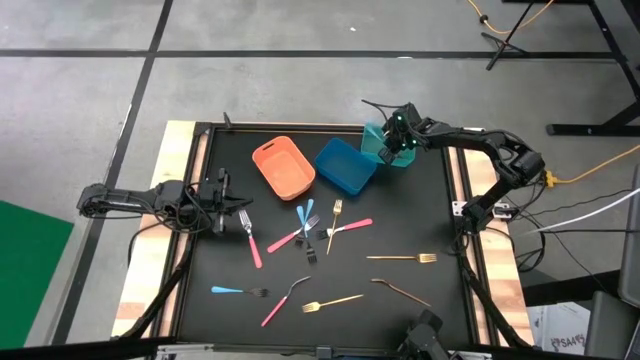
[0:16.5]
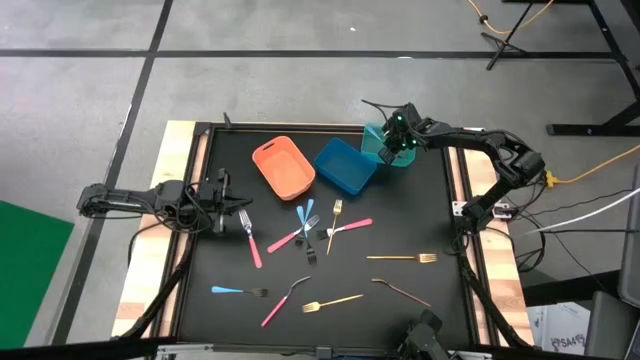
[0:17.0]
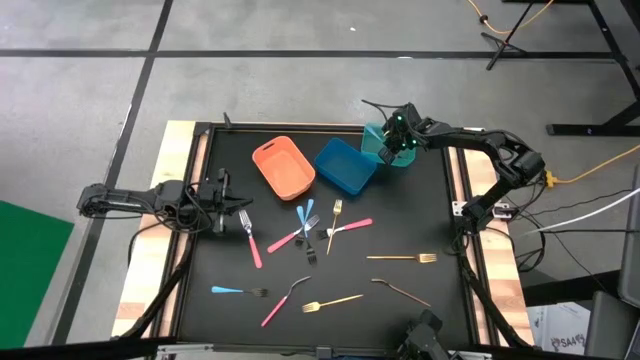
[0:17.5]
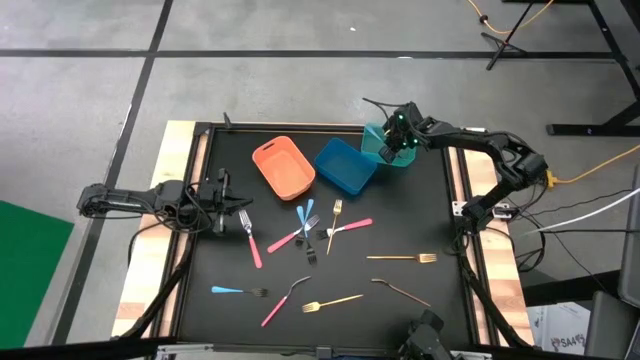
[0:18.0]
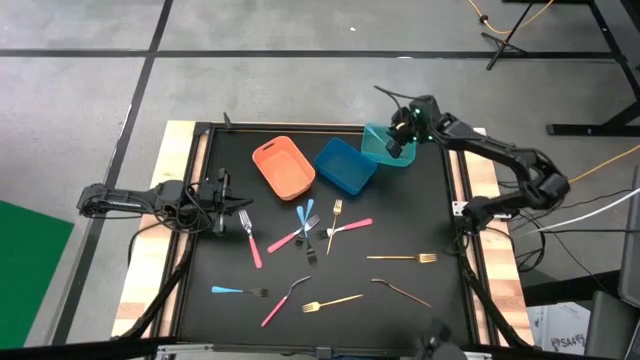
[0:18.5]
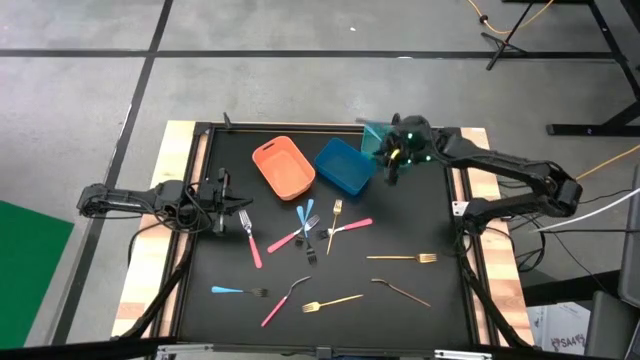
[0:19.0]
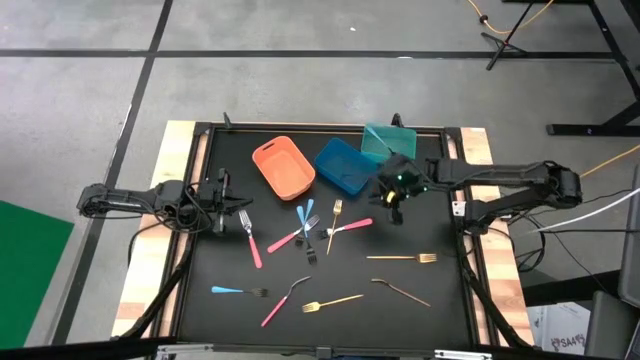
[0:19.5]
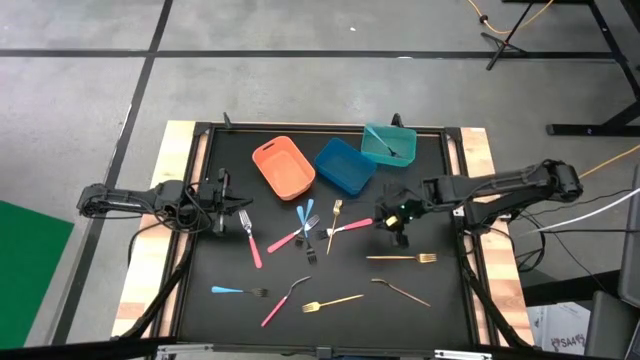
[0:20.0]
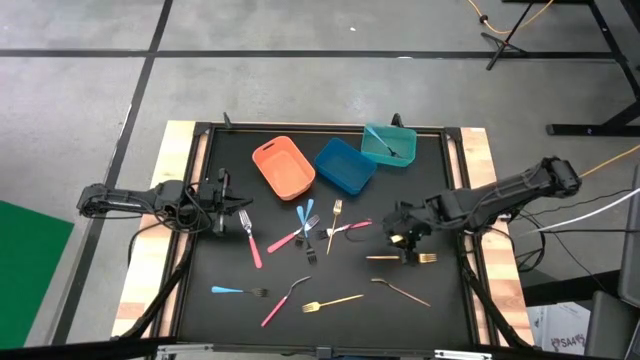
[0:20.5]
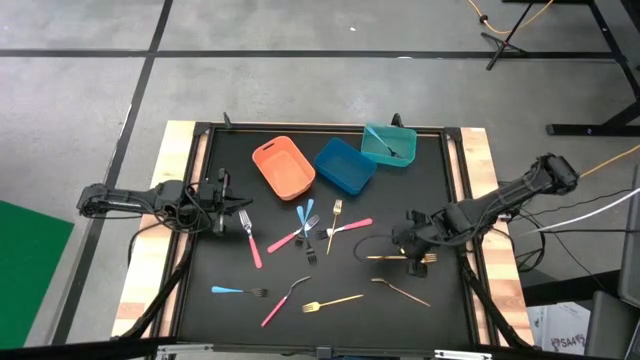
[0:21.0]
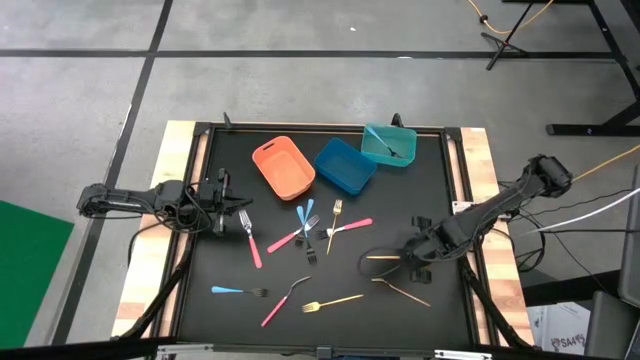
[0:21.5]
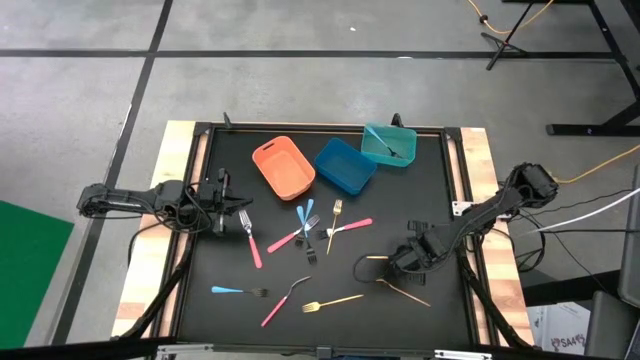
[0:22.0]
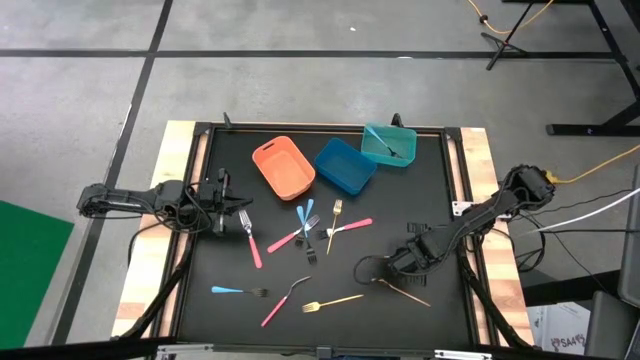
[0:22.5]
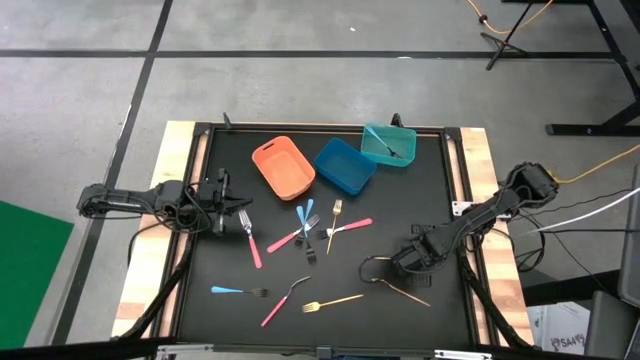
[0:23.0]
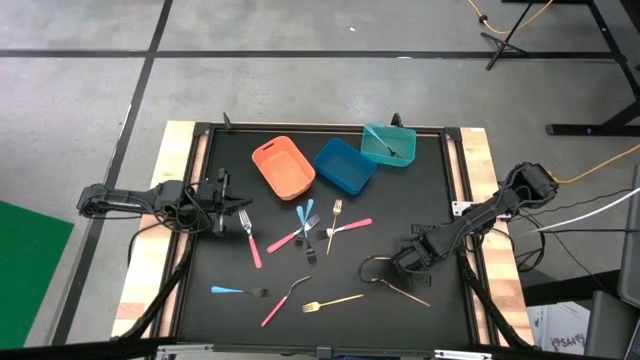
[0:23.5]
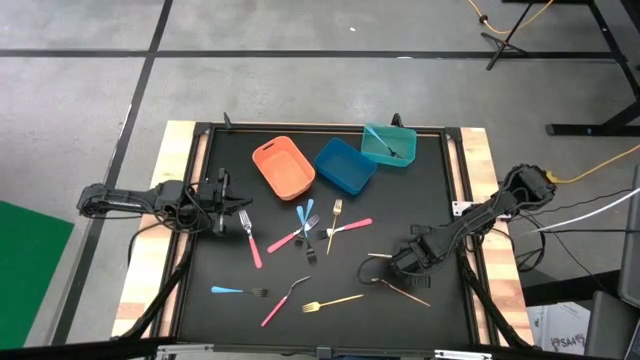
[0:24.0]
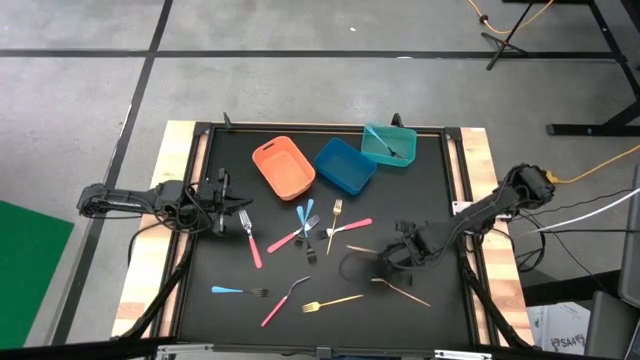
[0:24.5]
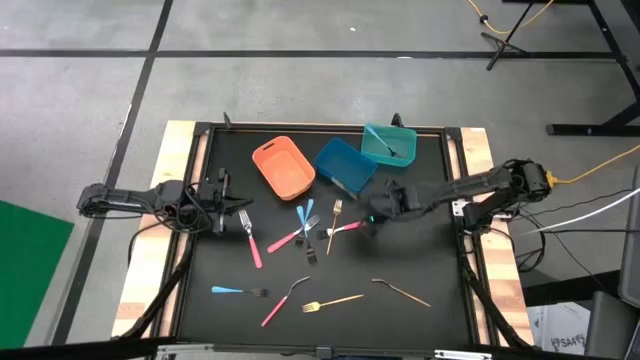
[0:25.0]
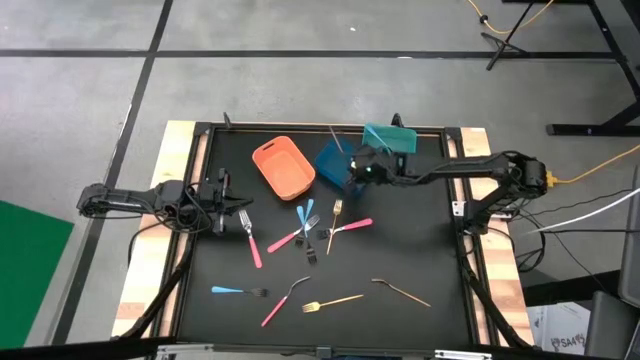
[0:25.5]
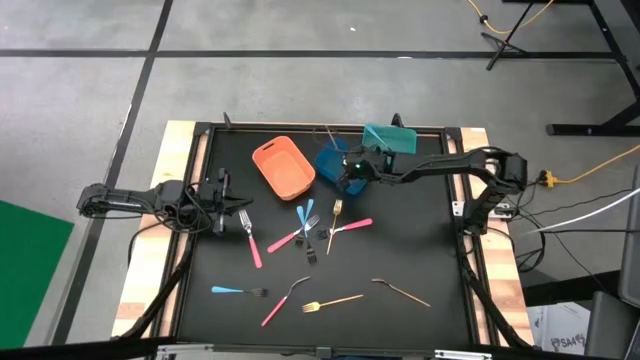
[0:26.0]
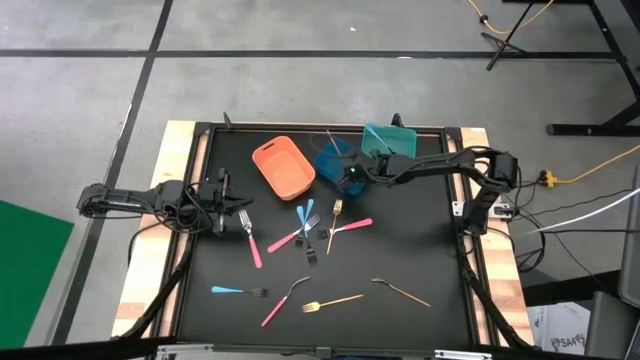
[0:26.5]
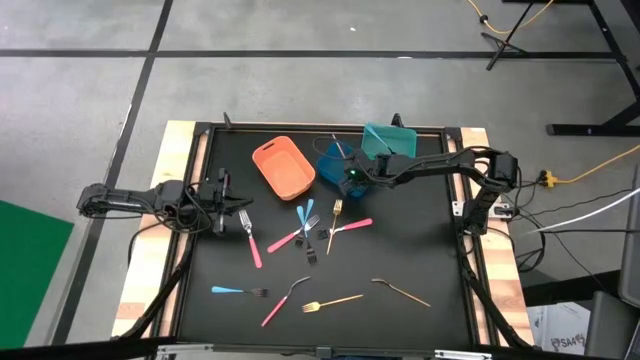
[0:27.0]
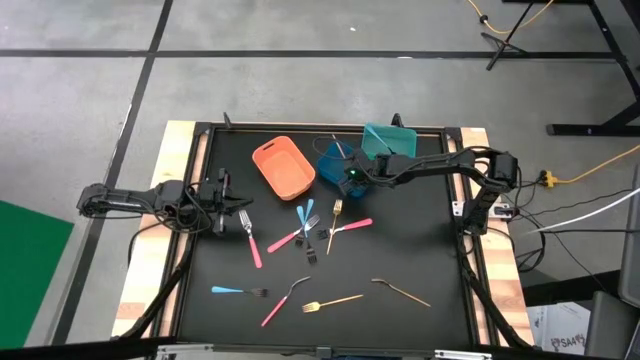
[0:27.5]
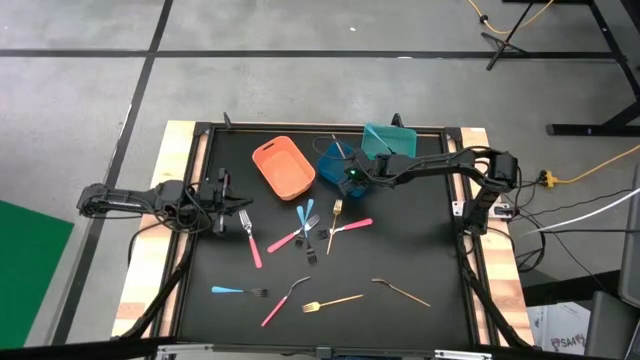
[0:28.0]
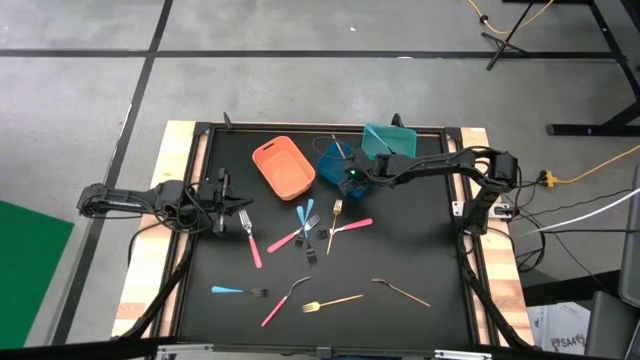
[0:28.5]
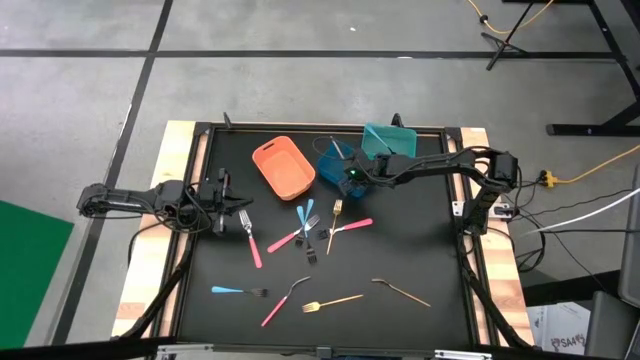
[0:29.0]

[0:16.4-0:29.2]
Task: Sort silverware by color (type)
Put the gold fork into the blue bin

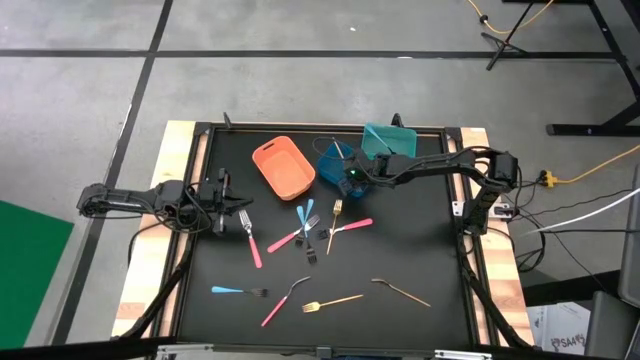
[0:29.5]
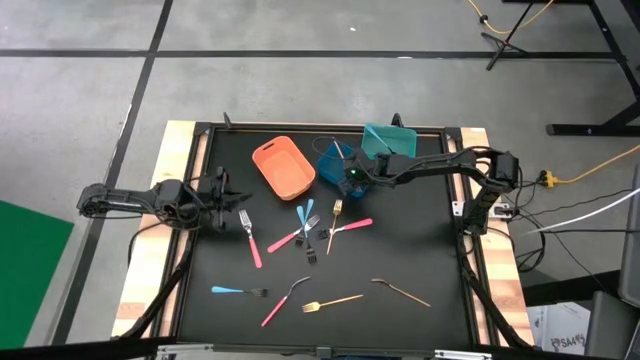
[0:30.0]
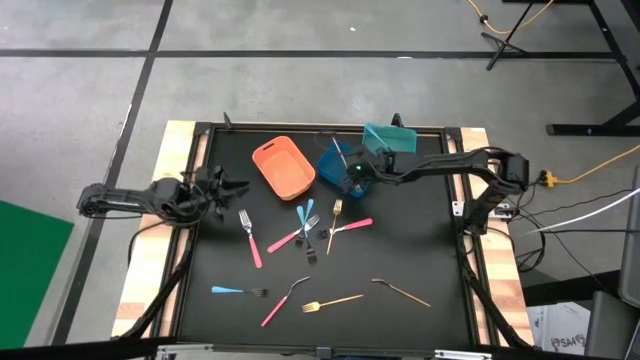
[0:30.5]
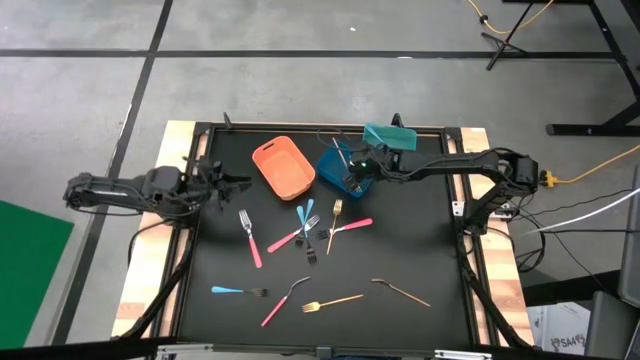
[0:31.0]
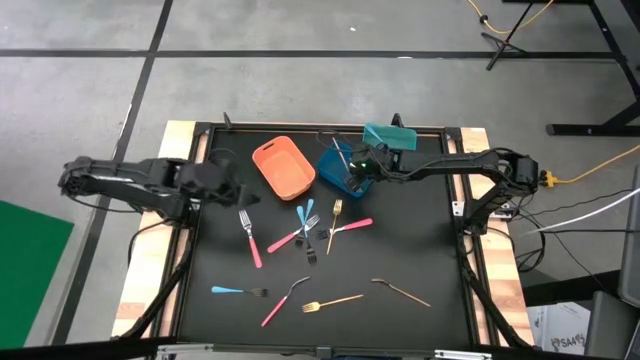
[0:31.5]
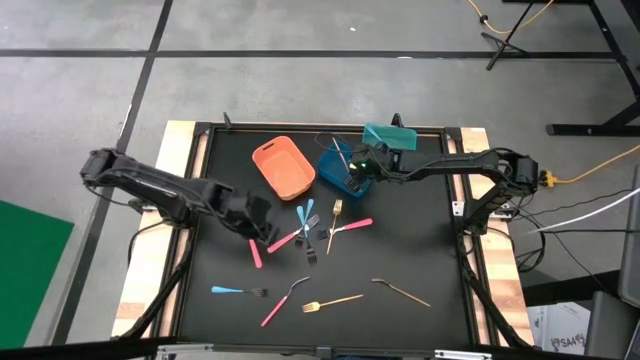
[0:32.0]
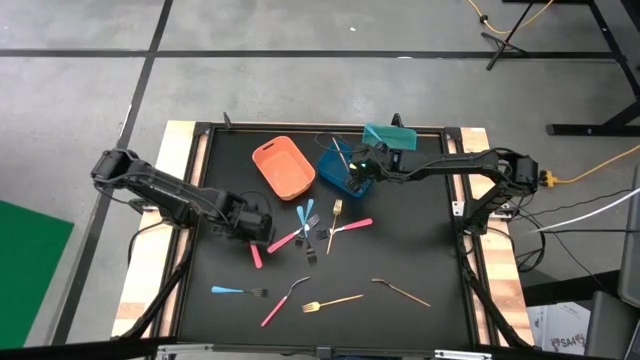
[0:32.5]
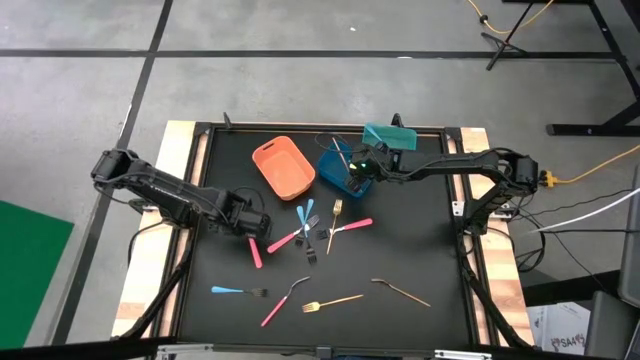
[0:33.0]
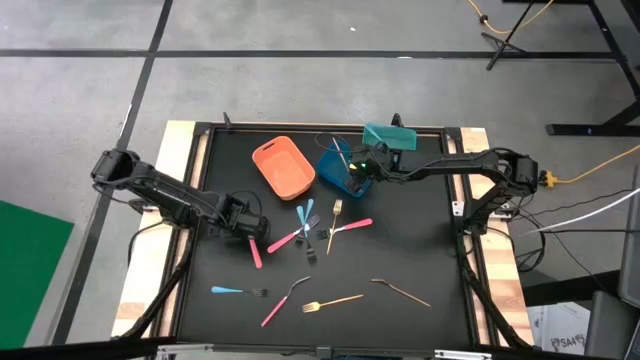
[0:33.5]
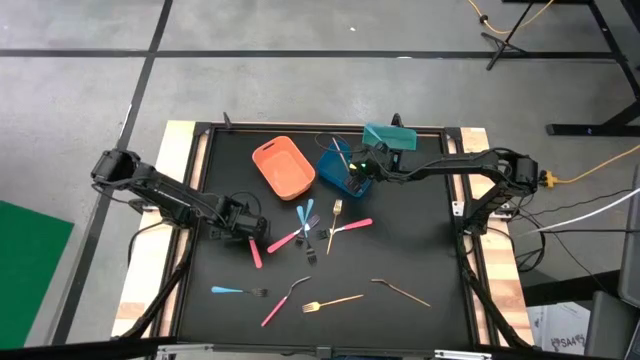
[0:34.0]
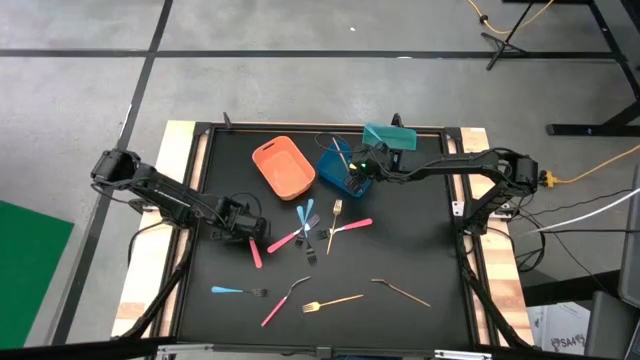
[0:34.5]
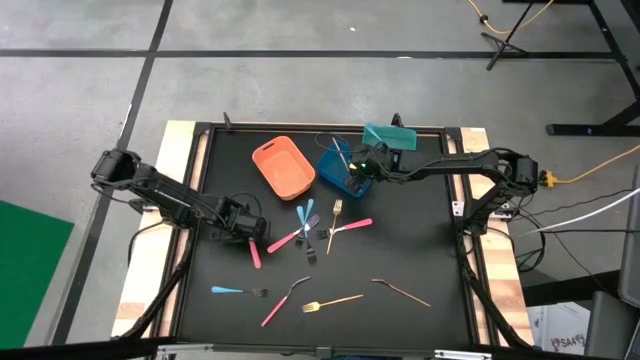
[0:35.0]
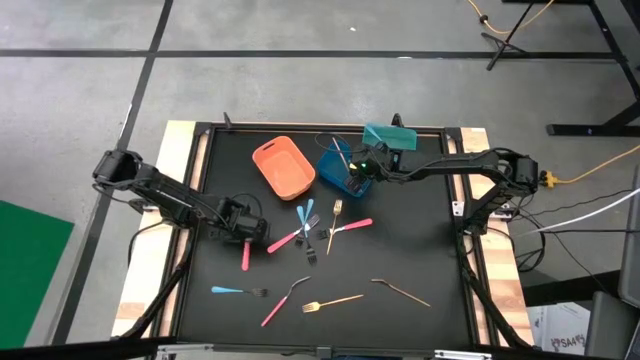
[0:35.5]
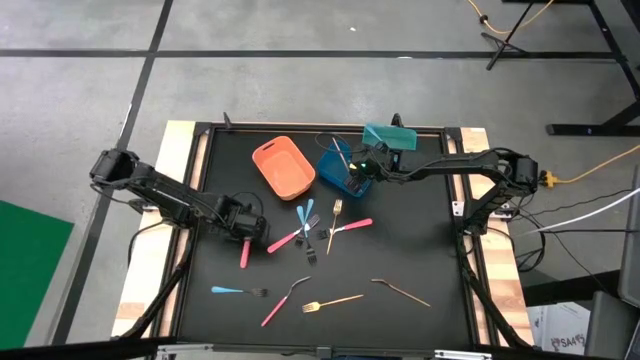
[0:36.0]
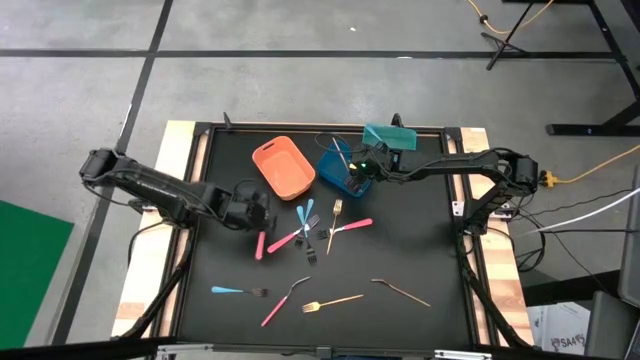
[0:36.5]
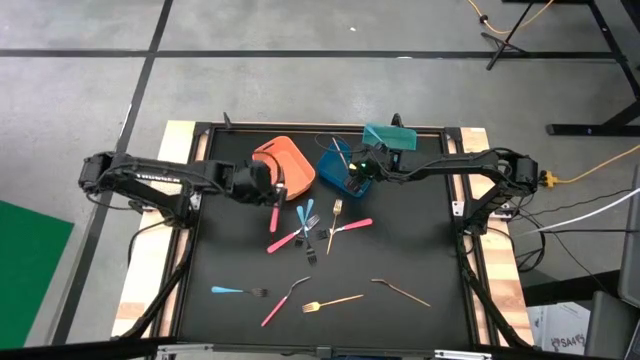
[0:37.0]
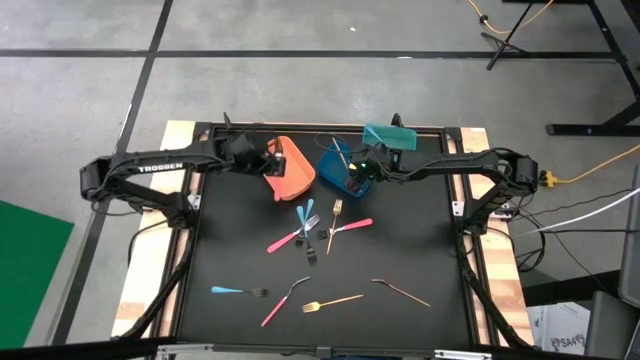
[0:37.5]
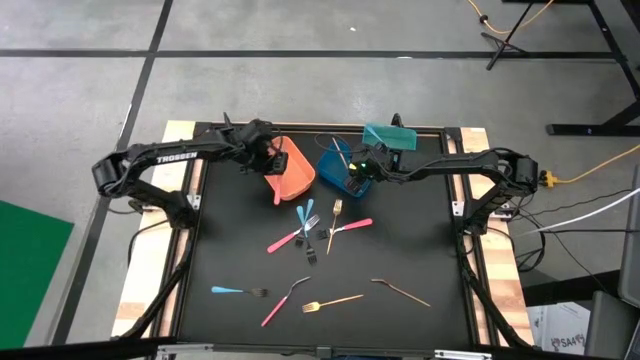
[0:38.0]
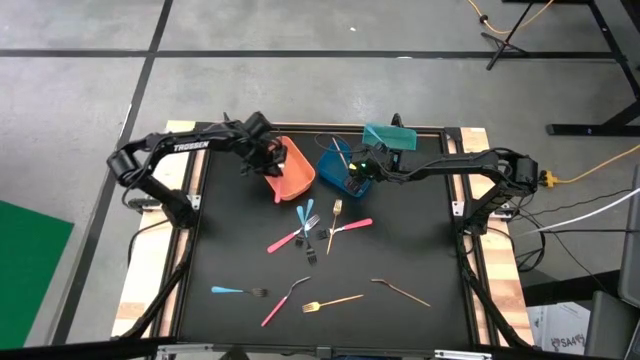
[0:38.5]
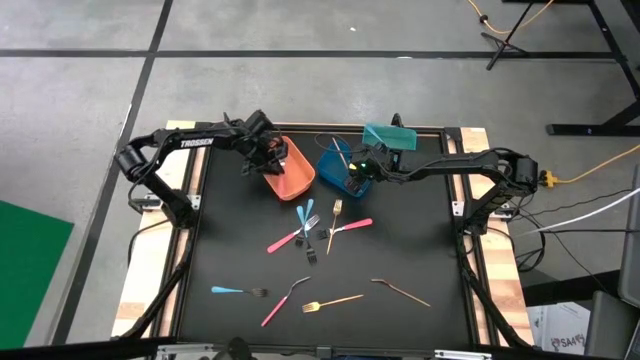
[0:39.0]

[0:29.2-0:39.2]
Put the pink fork into the orange bin
